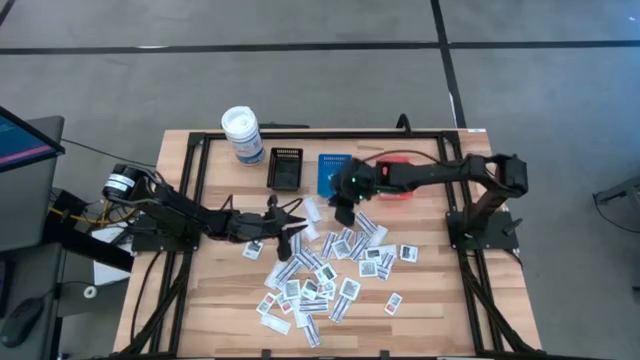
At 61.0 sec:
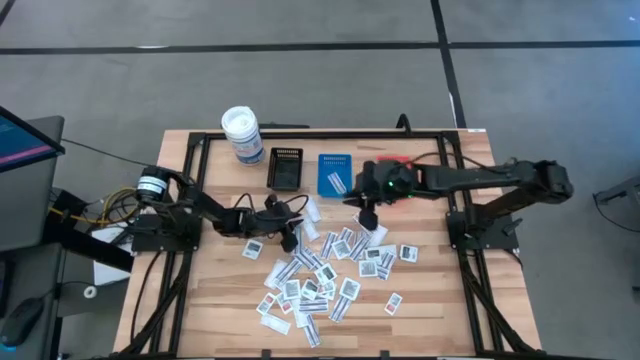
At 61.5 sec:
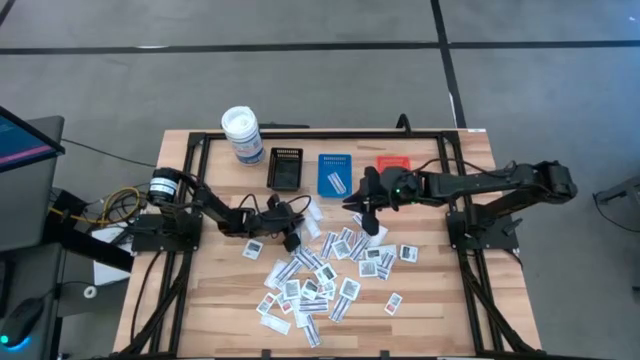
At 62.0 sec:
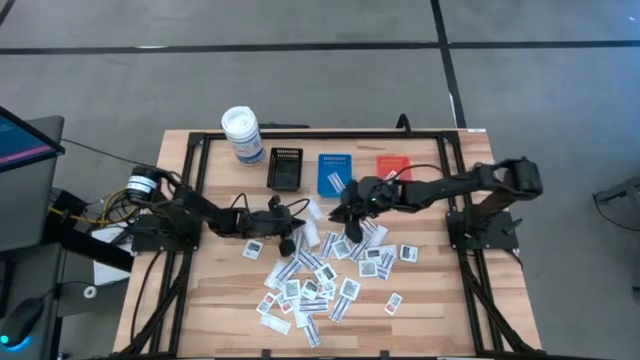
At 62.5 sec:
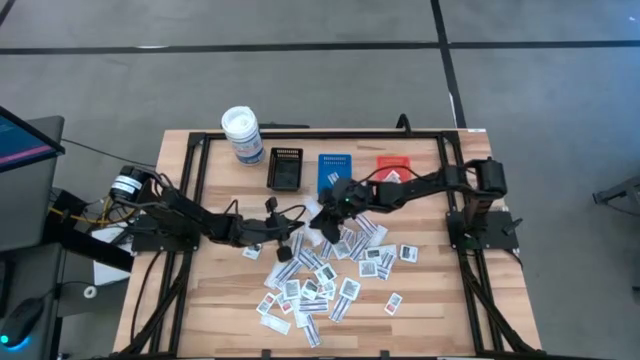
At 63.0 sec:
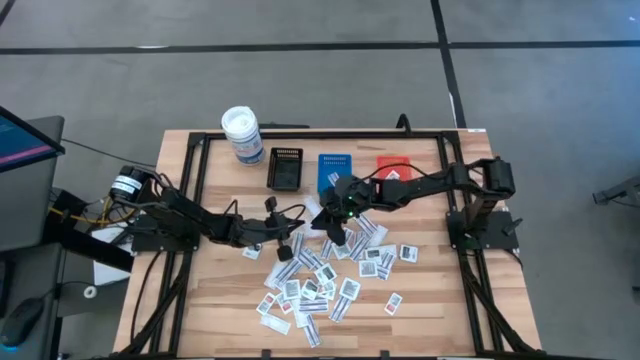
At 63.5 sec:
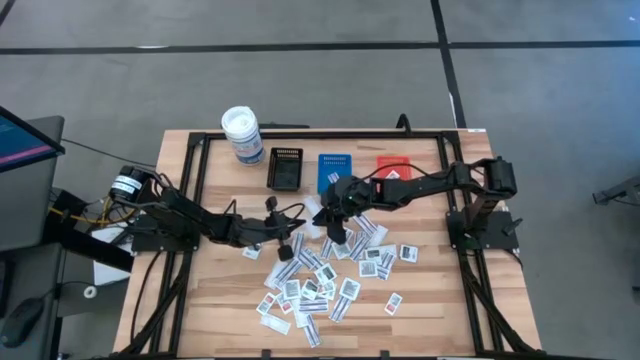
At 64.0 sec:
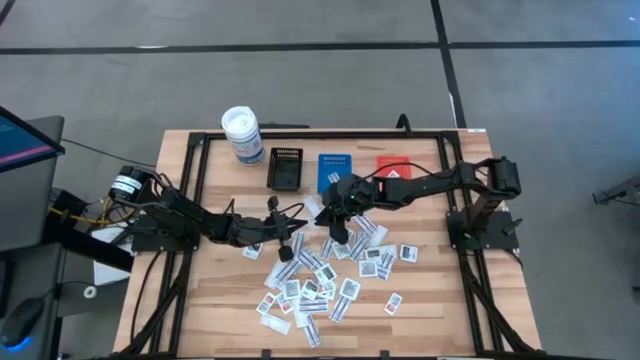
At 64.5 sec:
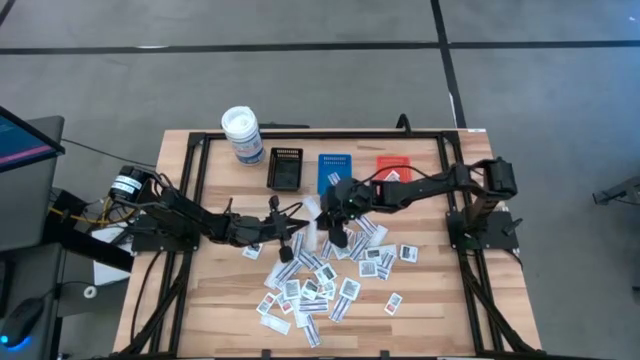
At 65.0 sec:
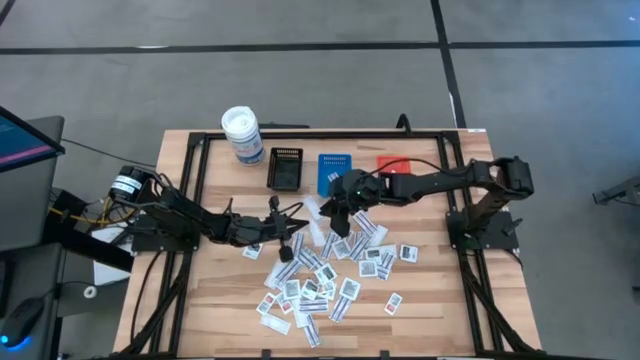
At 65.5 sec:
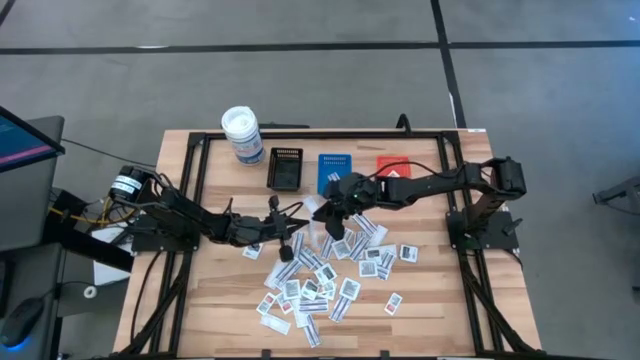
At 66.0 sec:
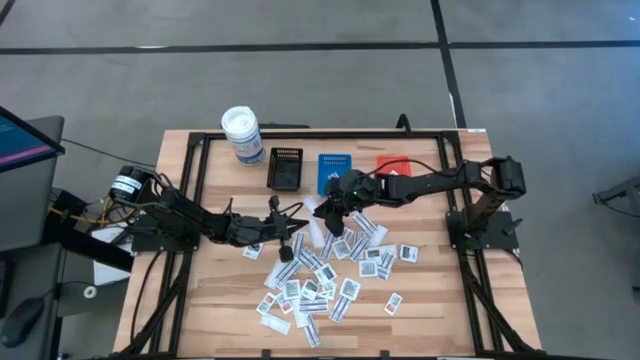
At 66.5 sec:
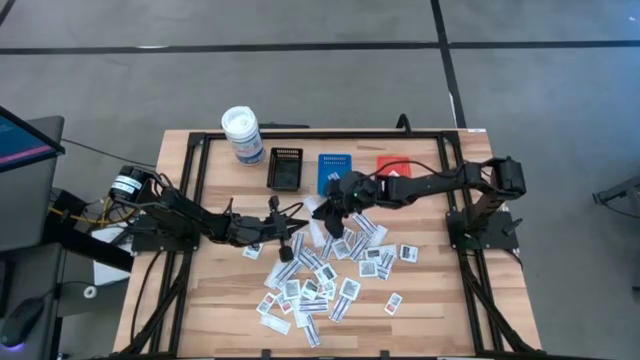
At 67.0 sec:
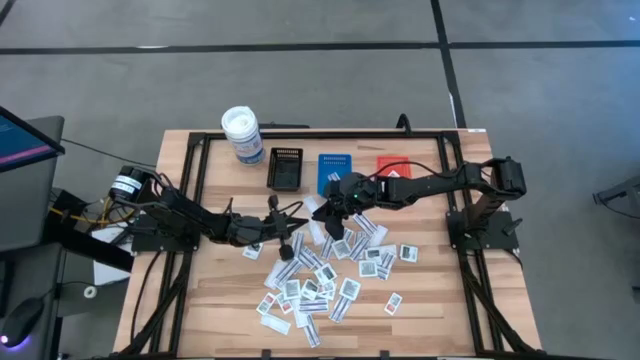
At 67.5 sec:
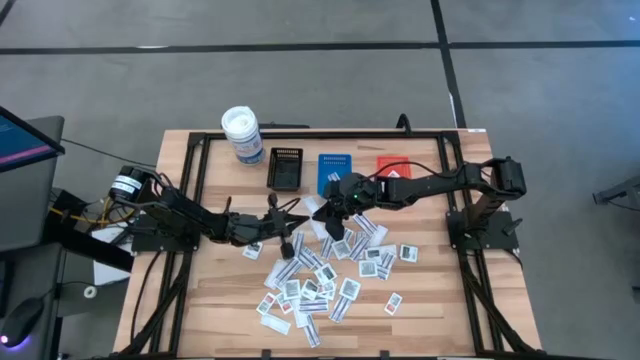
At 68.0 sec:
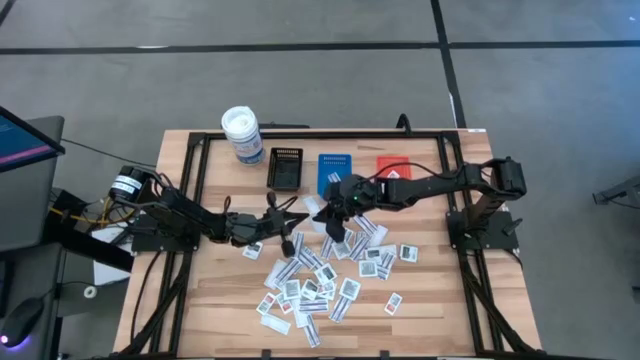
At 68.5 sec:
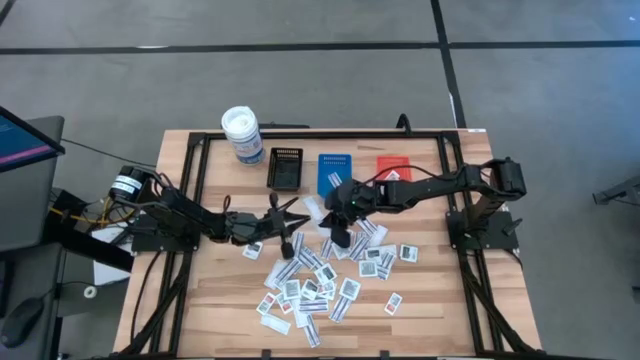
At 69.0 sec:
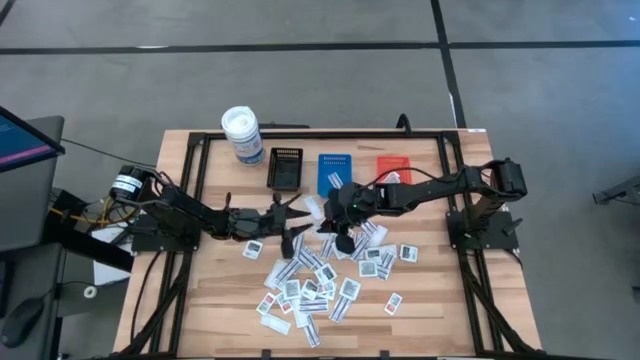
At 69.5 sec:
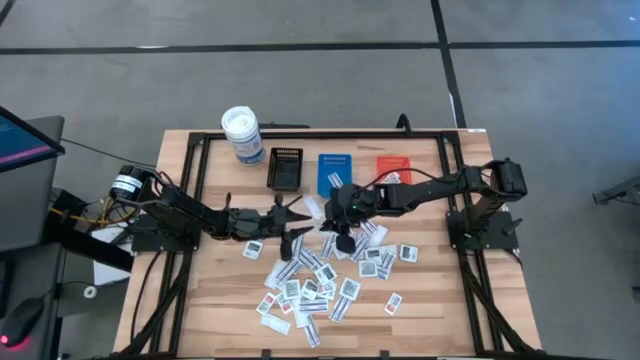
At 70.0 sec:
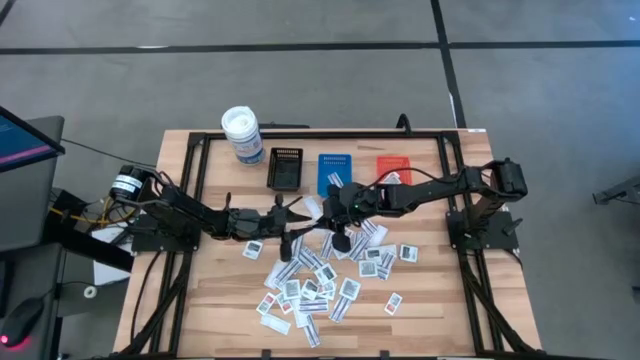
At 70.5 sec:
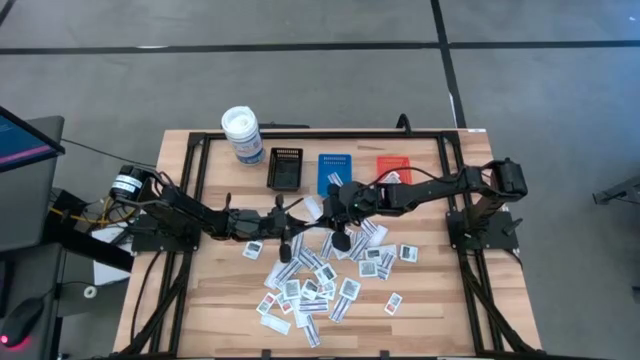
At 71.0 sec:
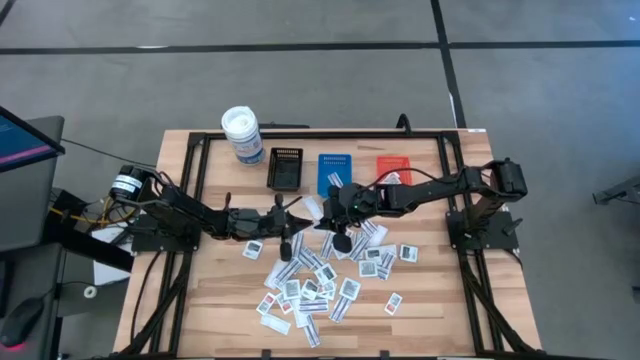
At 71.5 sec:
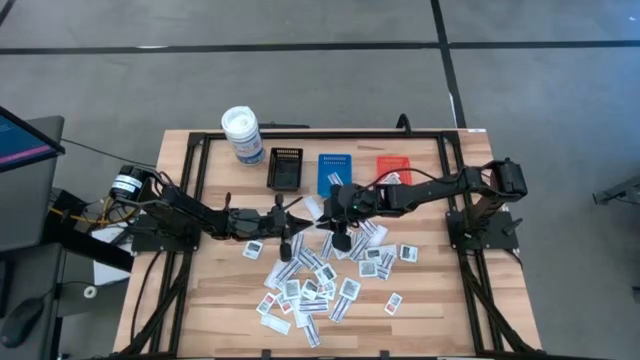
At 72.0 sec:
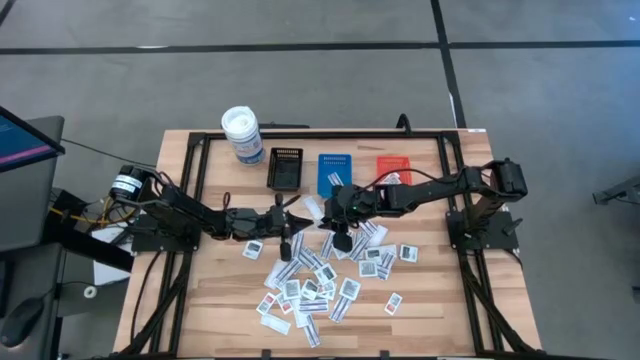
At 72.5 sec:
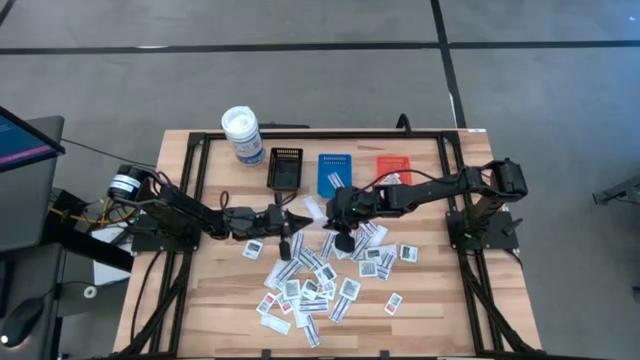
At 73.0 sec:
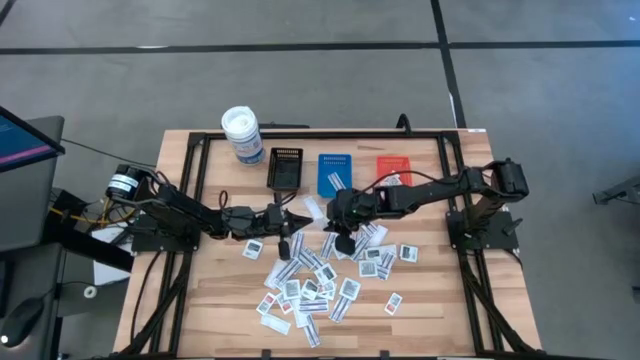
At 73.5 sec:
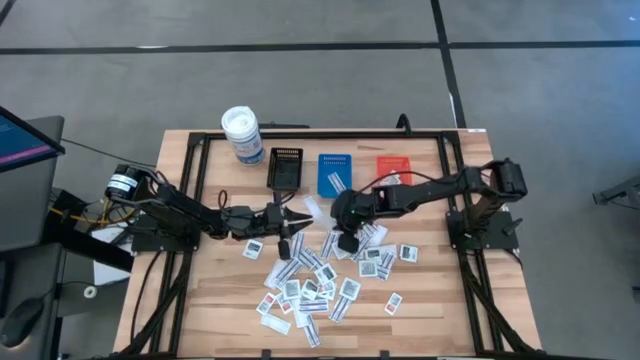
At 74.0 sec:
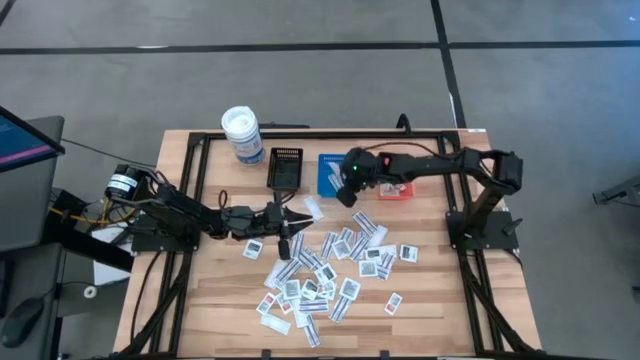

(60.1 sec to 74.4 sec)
Task: Pick & Place First Aid Supplies
Put the blue bandage into the blue bin

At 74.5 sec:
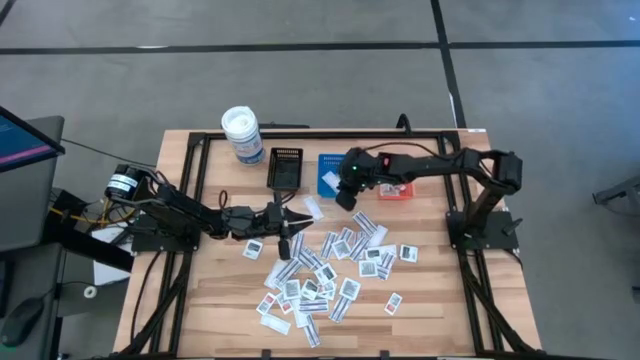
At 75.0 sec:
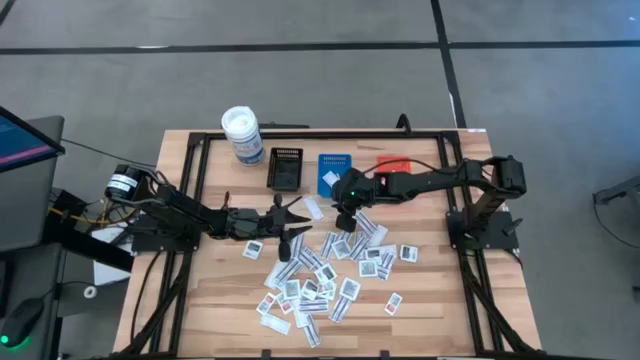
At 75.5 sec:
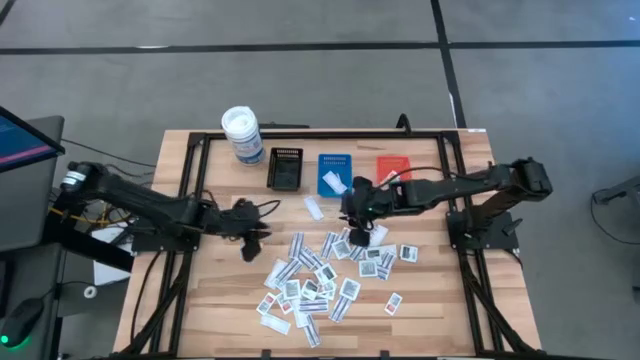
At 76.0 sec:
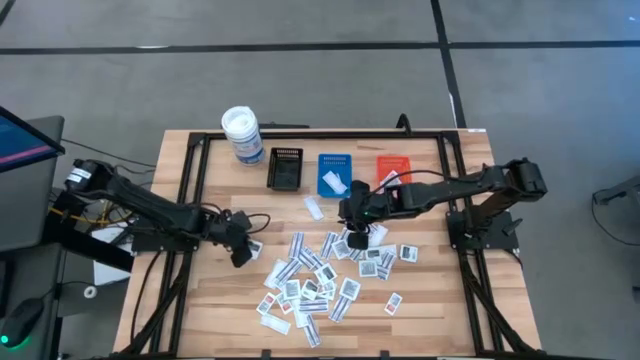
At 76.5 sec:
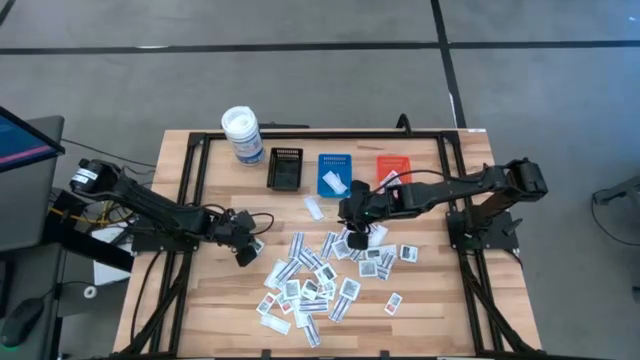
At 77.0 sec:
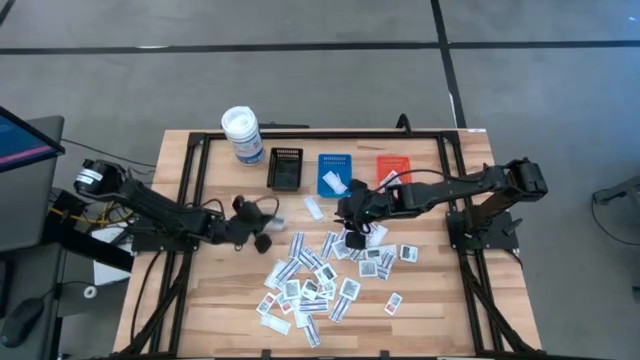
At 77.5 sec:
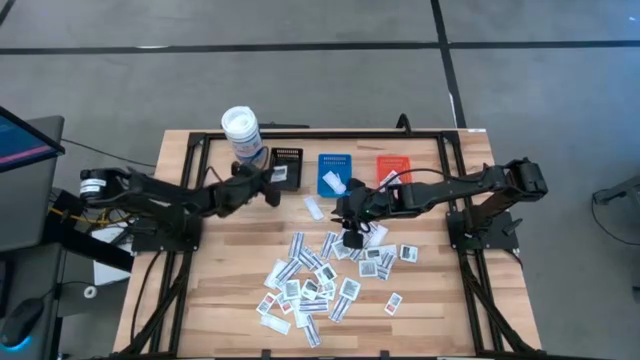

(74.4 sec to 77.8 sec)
Put the black towelette pack into the black bin

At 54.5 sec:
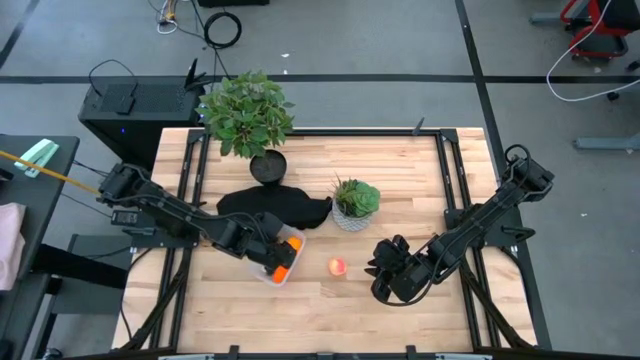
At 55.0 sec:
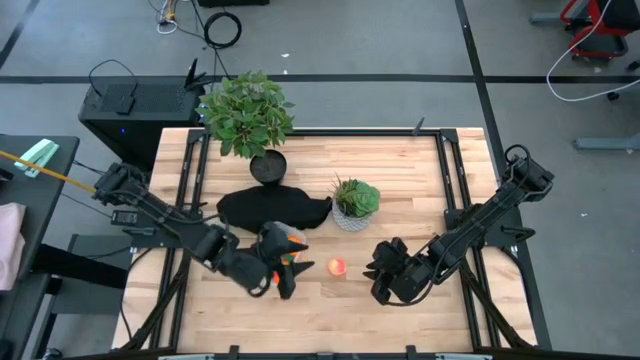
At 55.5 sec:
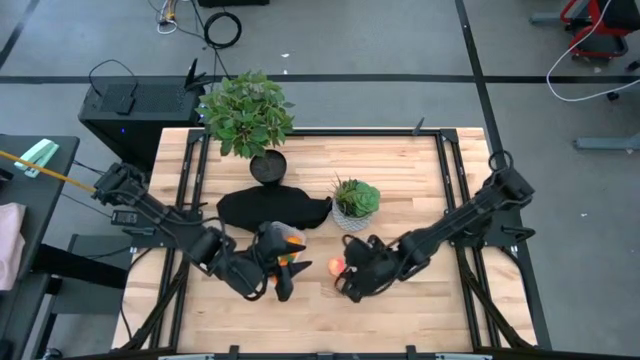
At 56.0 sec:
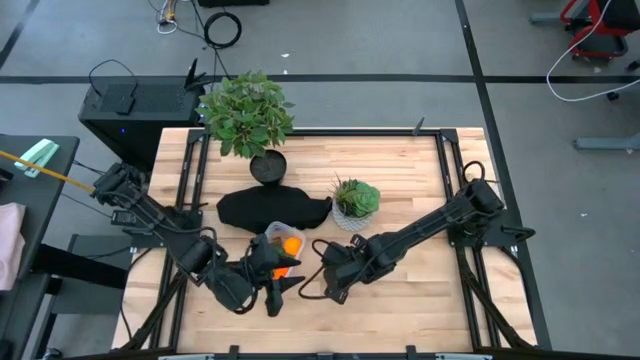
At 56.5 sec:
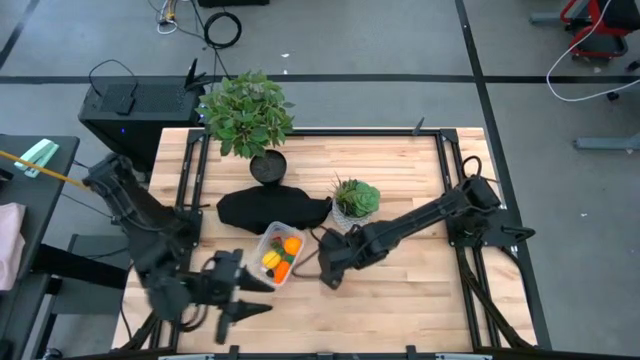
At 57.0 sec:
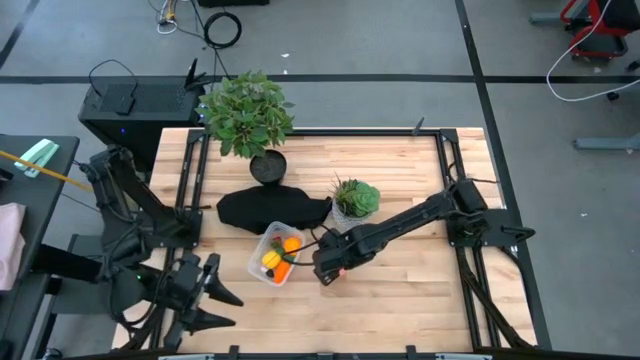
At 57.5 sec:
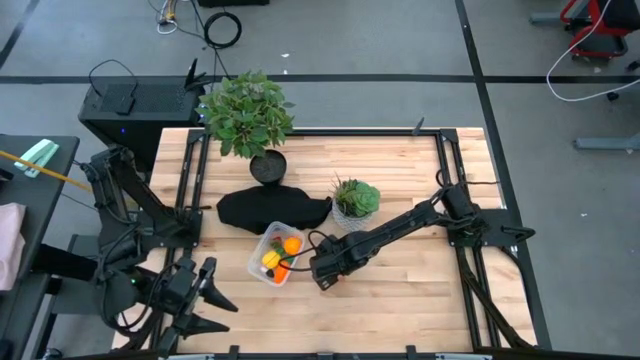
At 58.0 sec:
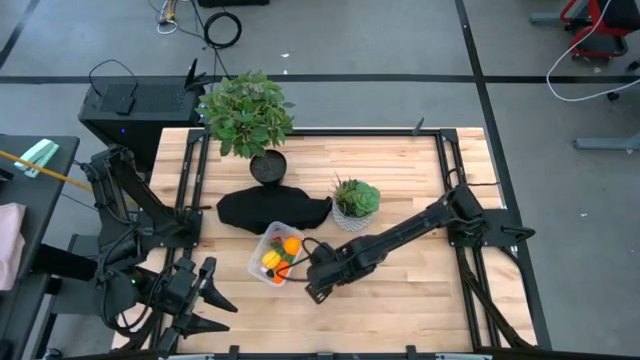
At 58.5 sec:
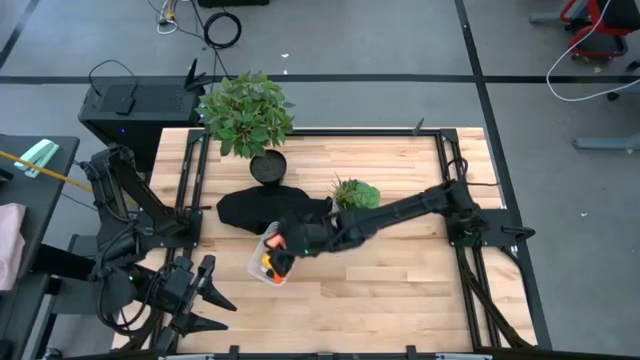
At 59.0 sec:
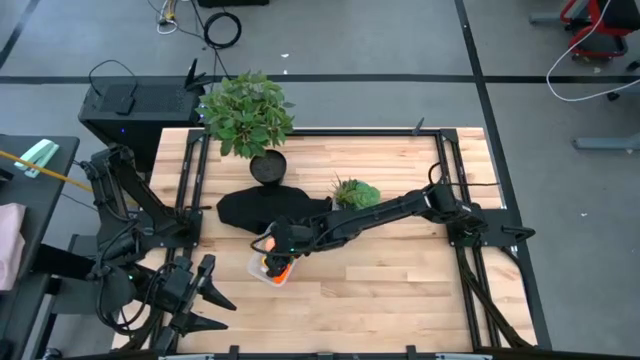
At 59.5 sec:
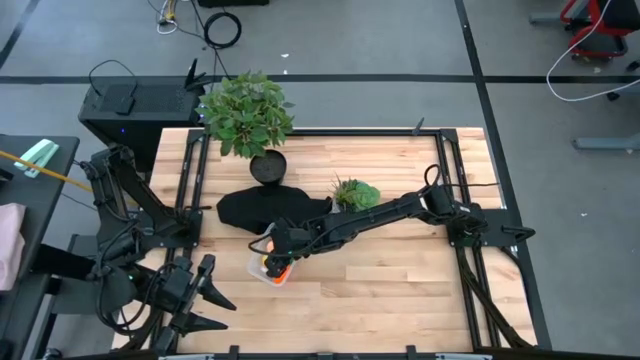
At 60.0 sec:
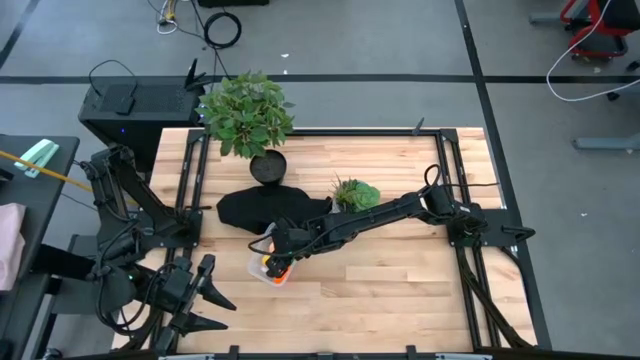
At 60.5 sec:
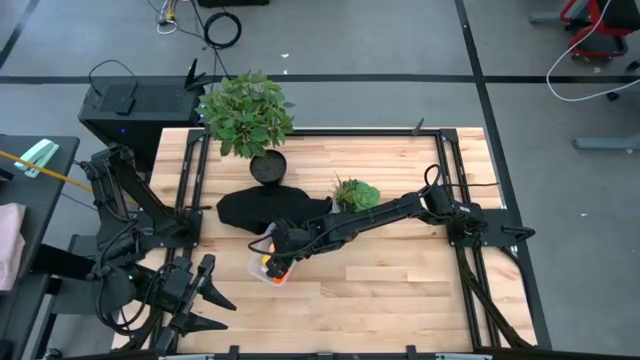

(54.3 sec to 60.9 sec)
Task: Pick and placing Produce into tupperware
Put the peach into the transparent bin
